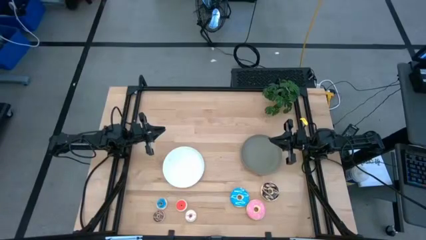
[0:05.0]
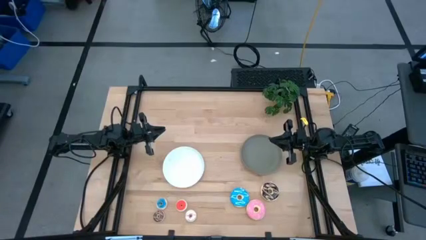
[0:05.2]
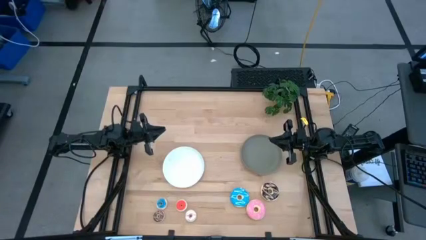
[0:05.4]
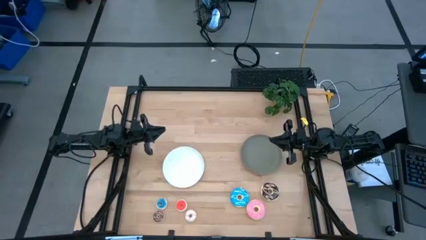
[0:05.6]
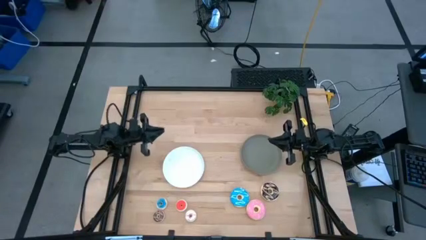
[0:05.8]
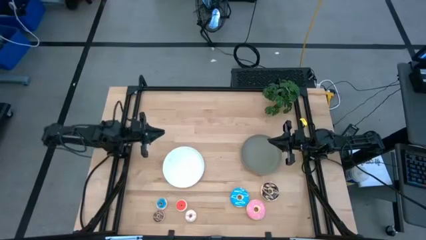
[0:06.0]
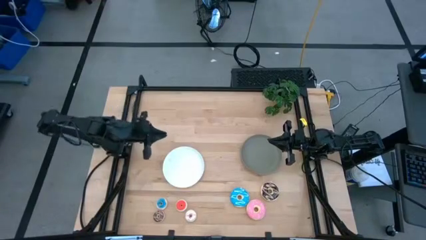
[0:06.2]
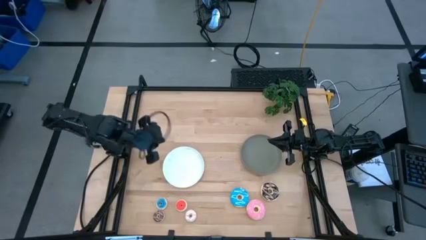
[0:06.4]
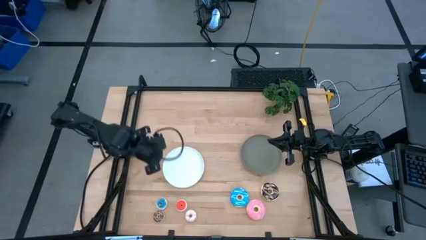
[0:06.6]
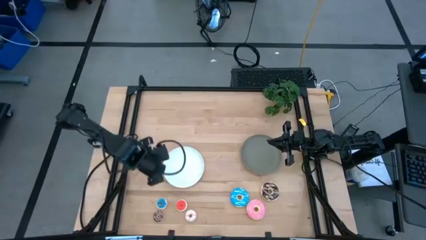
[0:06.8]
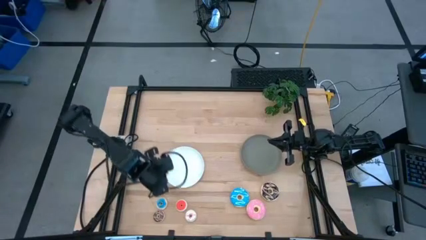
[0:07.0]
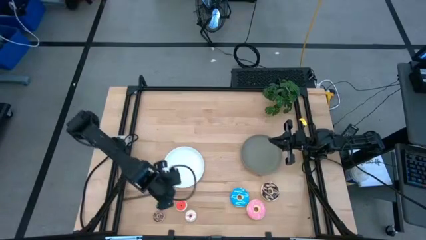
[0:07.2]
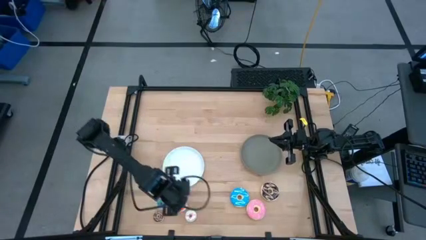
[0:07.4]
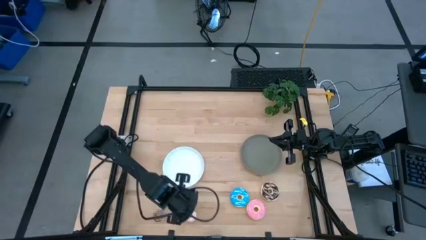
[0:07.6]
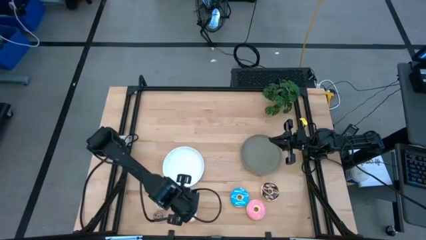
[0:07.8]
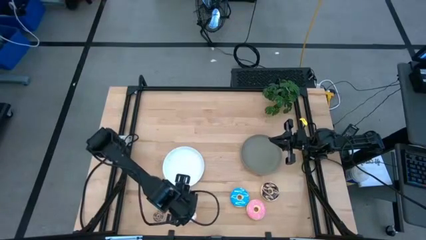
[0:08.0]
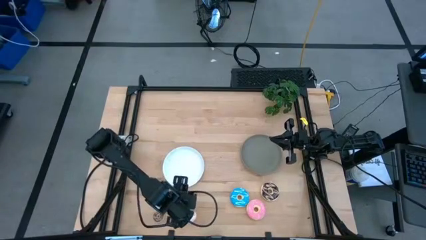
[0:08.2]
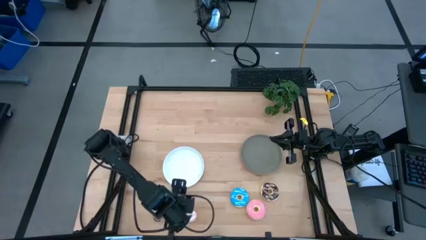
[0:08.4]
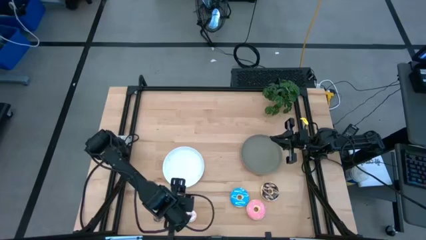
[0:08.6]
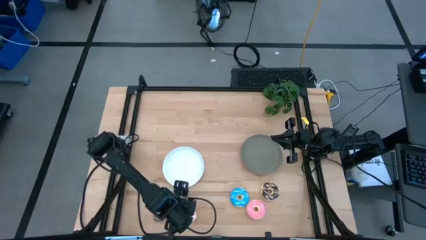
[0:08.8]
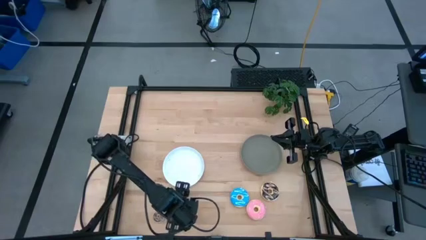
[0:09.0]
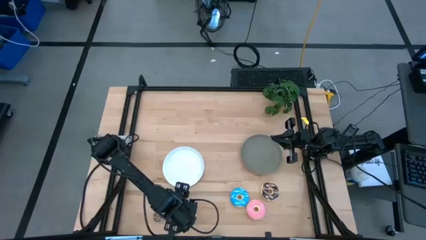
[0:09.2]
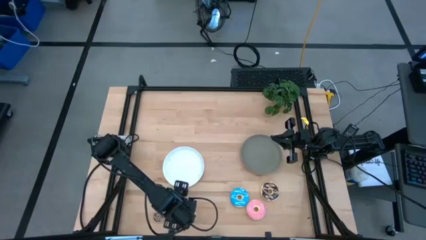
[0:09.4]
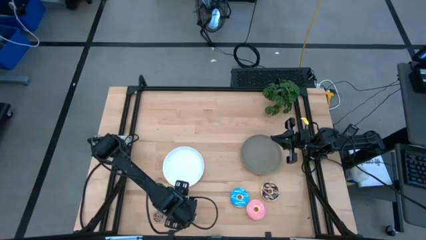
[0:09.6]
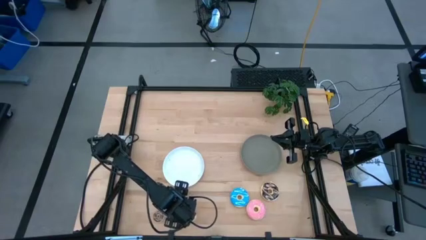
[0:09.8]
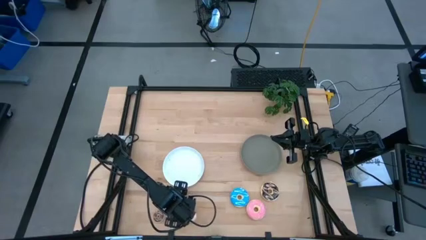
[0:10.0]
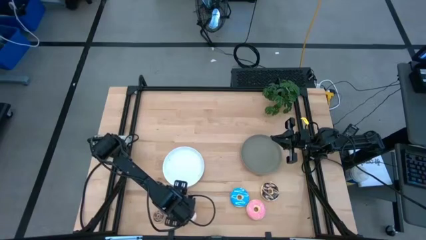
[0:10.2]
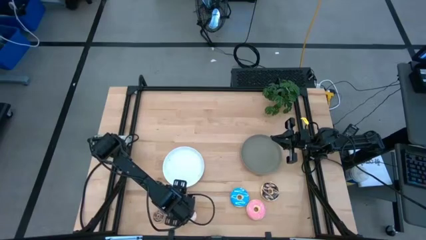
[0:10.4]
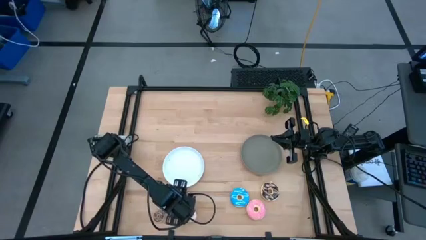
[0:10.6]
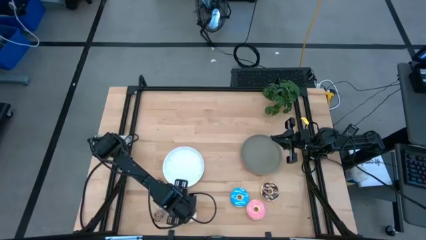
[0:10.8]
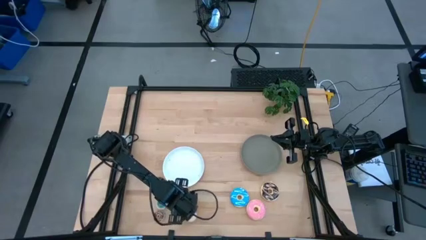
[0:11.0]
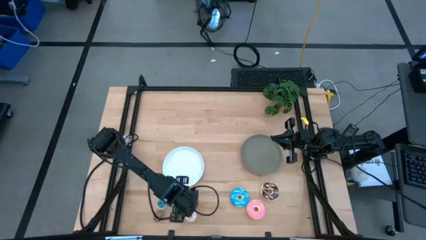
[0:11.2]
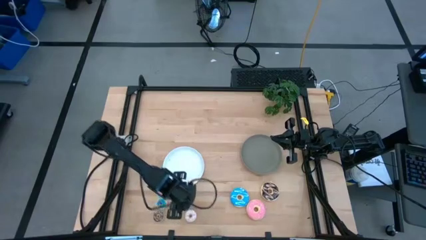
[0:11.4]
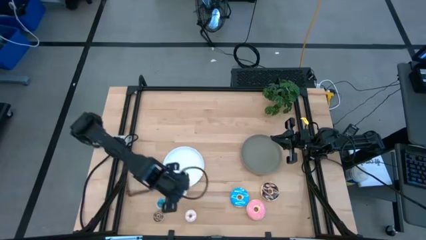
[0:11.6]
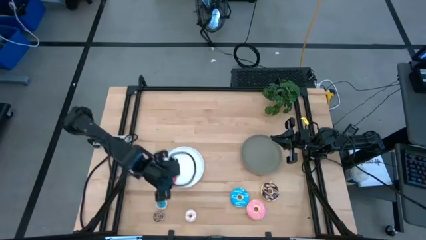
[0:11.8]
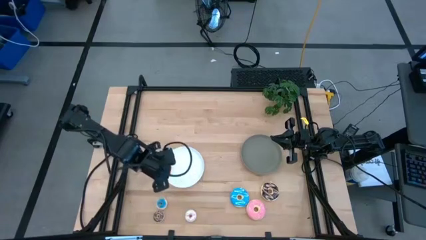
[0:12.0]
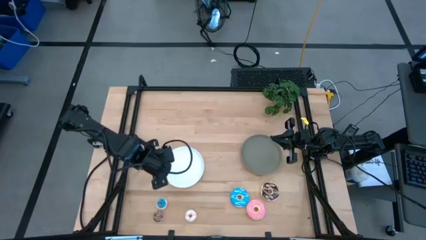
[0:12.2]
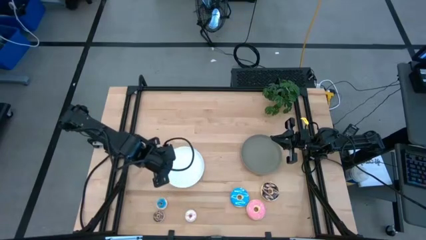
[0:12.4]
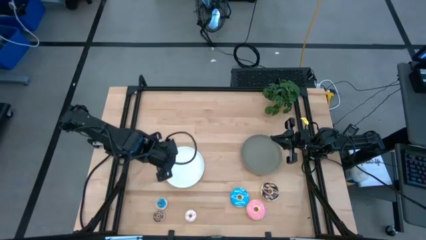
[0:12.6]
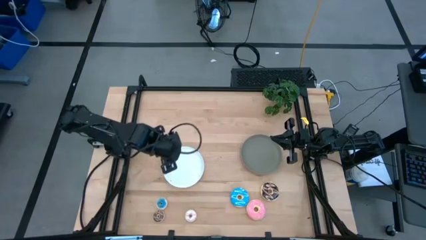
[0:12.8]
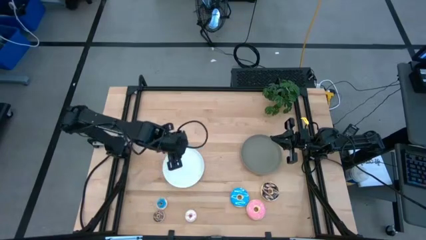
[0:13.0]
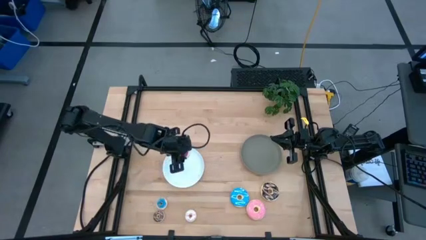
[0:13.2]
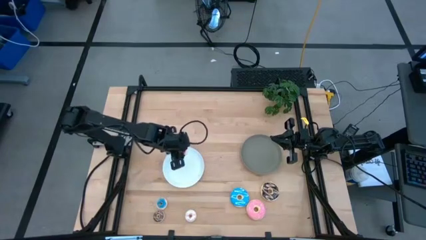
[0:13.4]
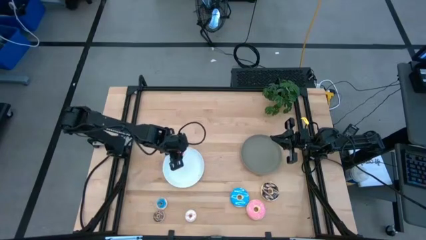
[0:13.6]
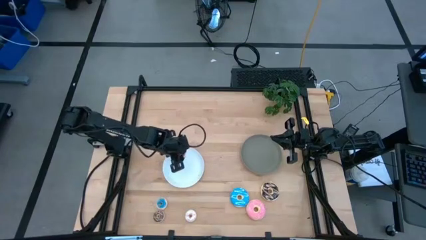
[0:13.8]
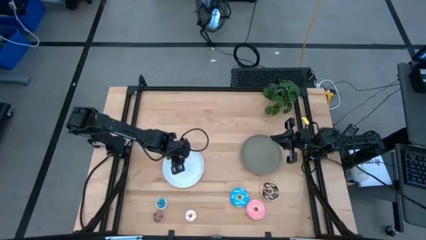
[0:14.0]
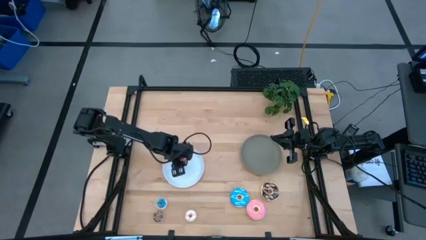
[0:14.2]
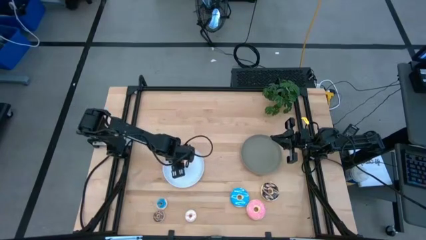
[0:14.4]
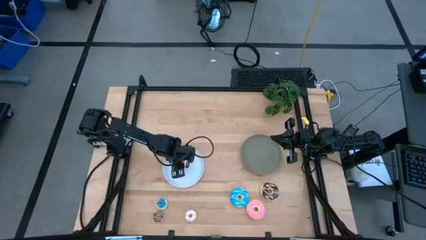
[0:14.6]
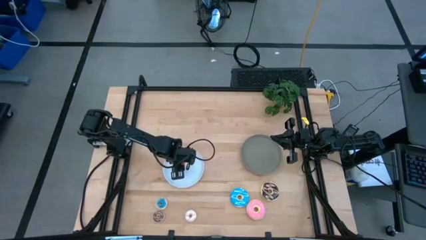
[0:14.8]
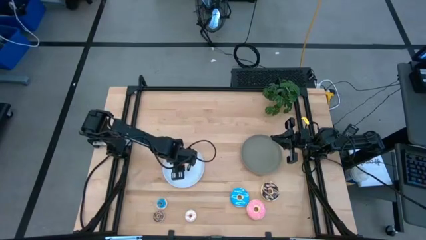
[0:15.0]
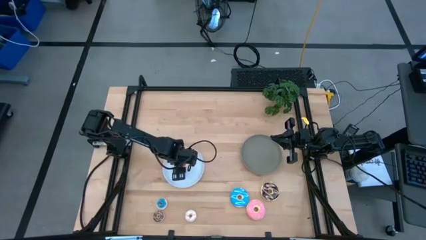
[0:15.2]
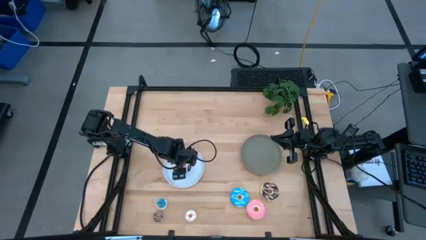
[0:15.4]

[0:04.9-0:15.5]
Task: Pick & Place donuts
Put the small orange donut on the white plate

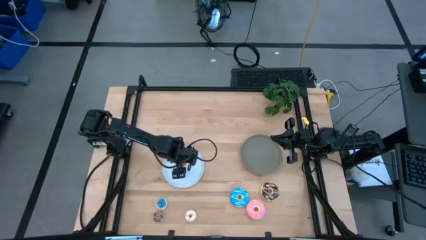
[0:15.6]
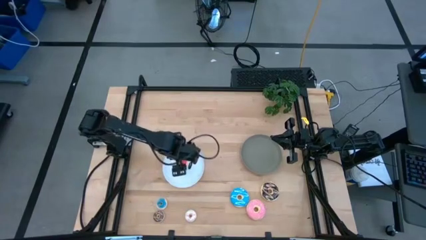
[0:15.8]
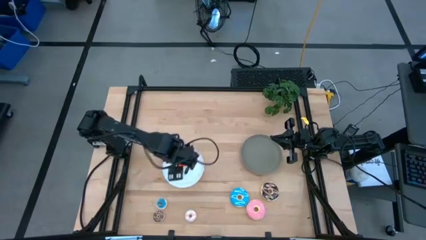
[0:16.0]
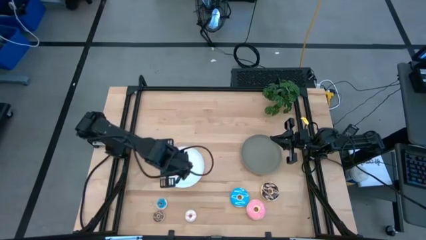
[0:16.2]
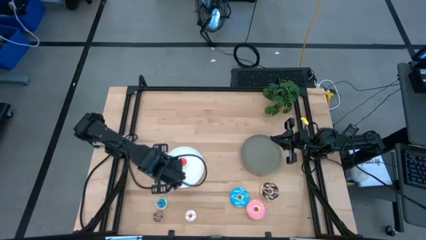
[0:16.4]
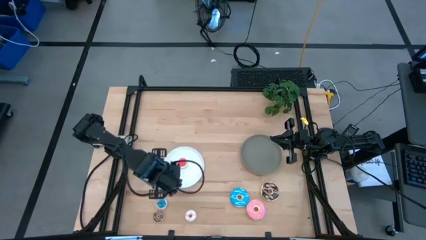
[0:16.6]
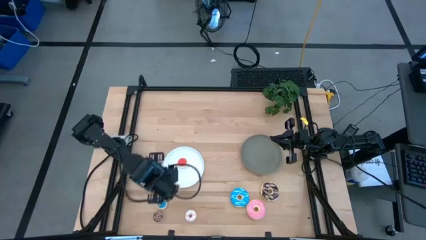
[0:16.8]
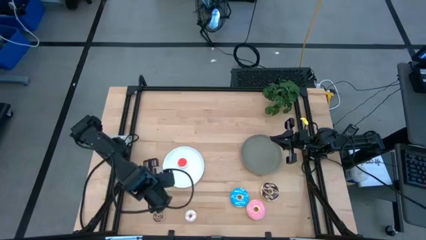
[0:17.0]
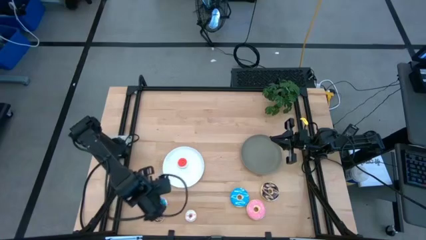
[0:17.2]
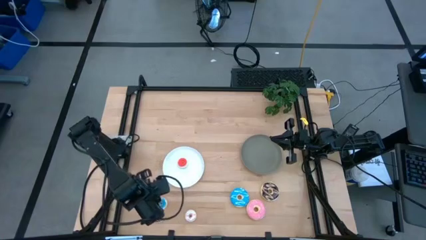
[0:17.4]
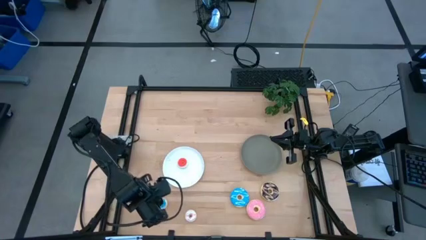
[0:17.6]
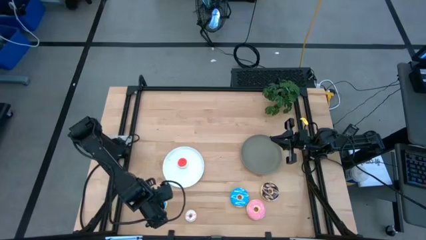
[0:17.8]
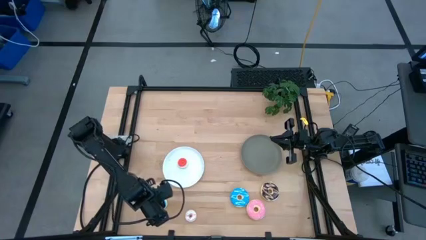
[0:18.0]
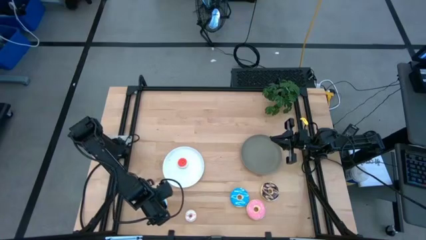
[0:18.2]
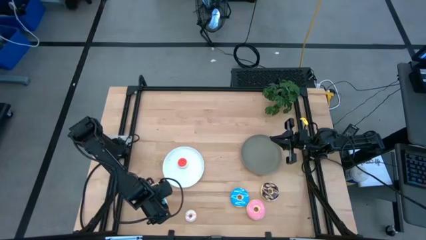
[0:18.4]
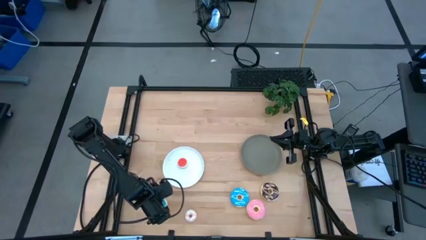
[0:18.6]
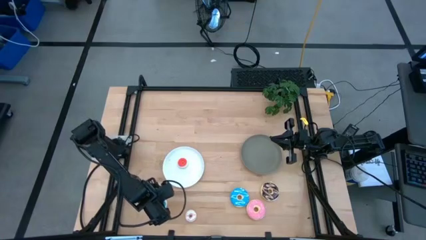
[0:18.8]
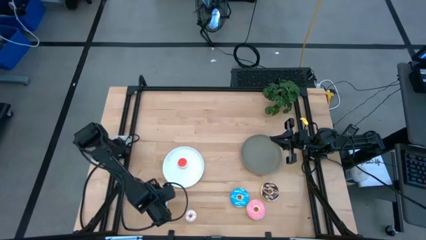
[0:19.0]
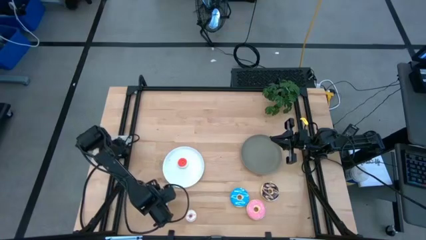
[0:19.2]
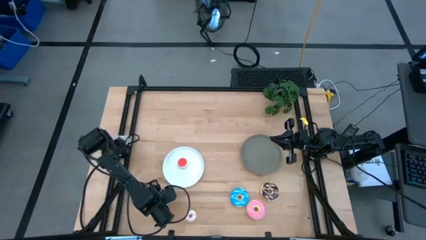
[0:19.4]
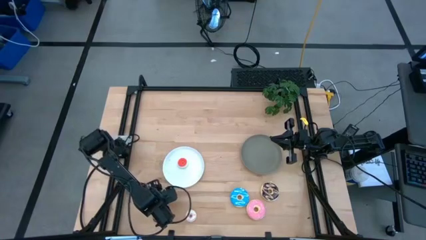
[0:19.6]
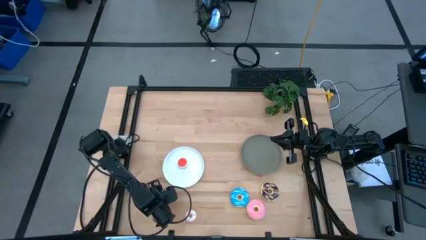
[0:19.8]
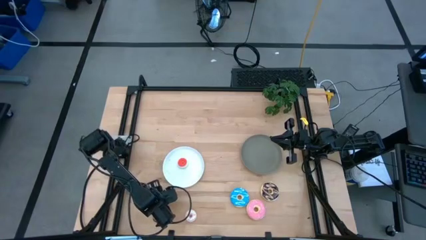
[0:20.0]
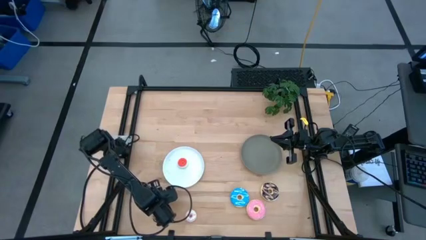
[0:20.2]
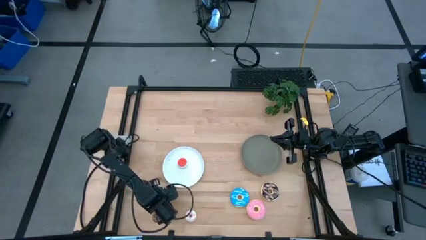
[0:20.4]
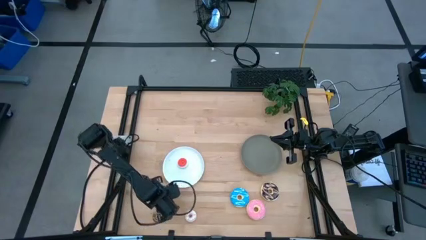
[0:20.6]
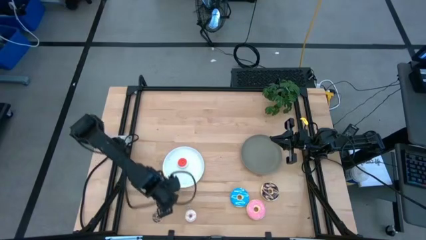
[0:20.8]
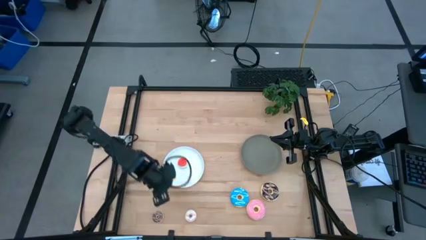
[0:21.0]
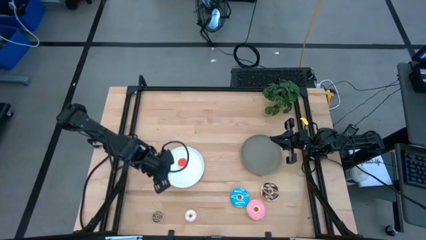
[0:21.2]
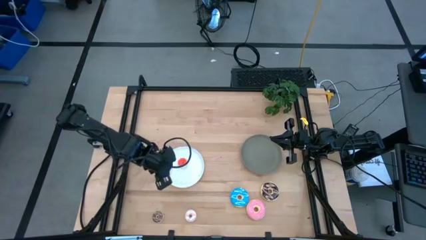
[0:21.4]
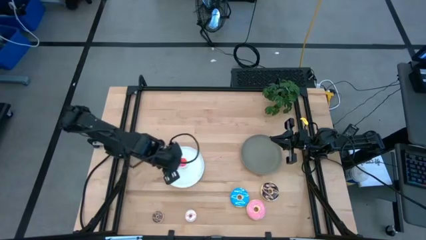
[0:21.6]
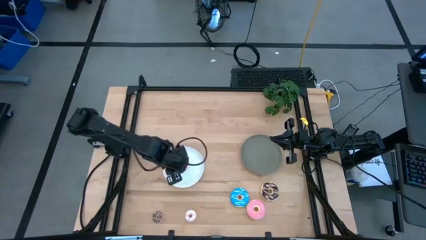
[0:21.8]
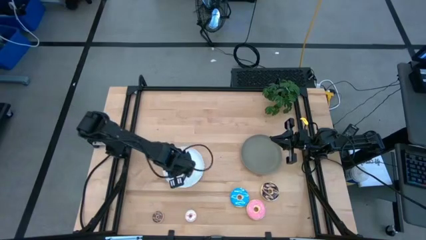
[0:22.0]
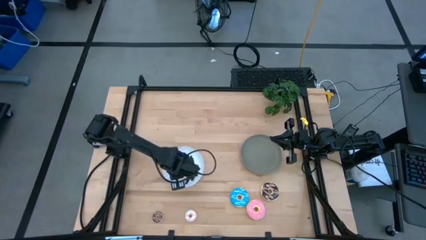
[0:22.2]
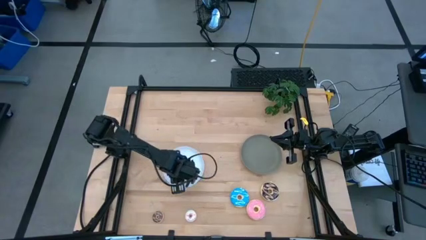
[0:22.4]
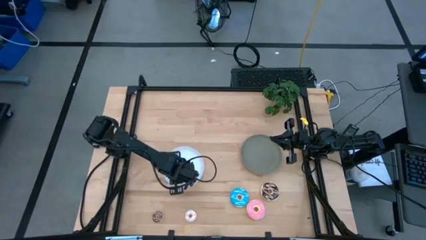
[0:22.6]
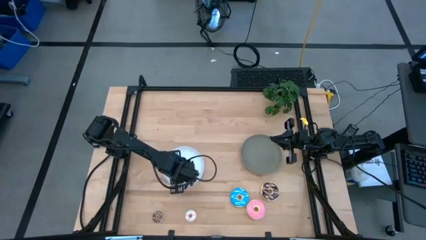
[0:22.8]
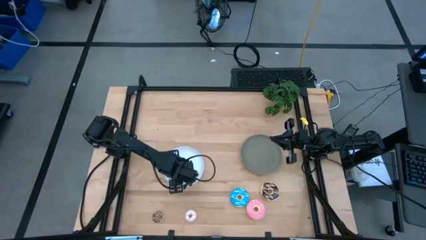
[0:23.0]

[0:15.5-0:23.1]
Put the small blue donut on the white plate
